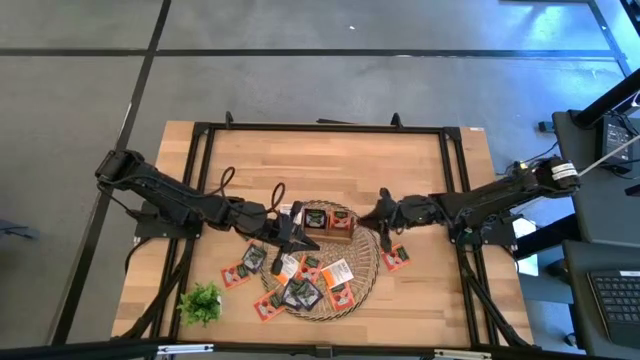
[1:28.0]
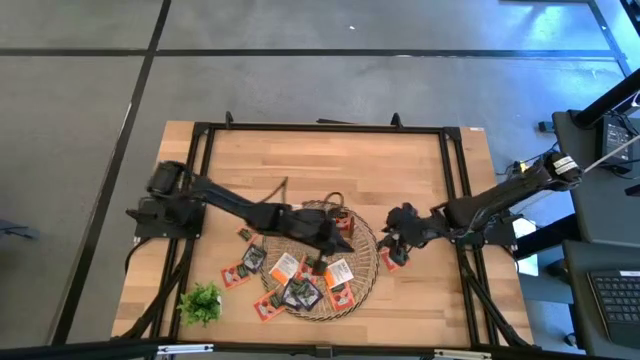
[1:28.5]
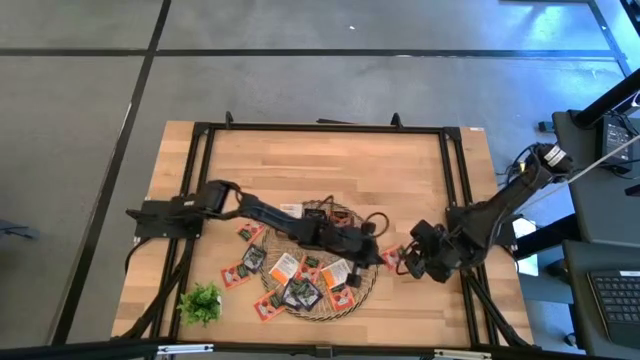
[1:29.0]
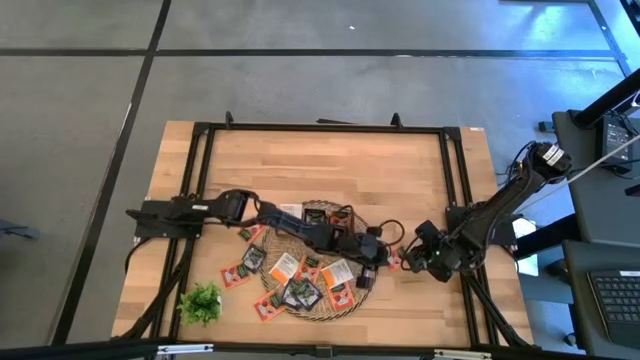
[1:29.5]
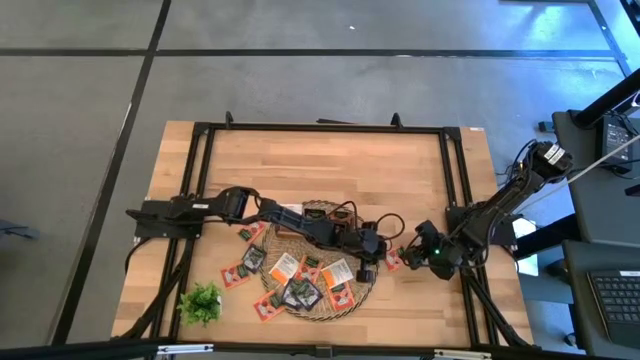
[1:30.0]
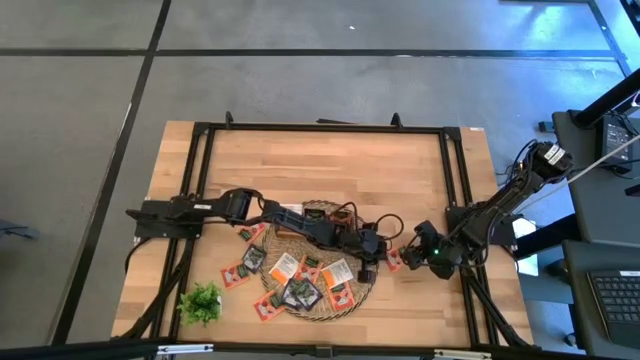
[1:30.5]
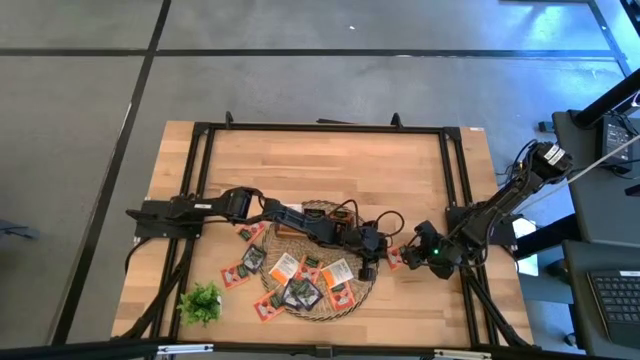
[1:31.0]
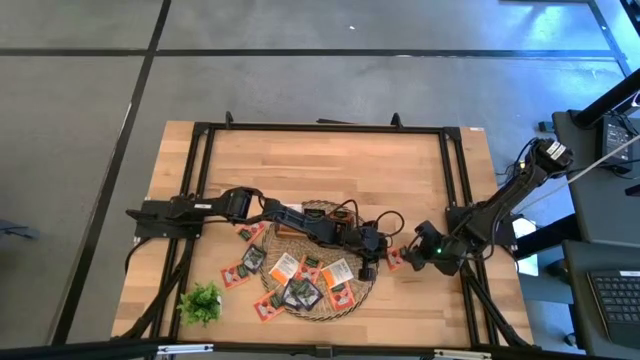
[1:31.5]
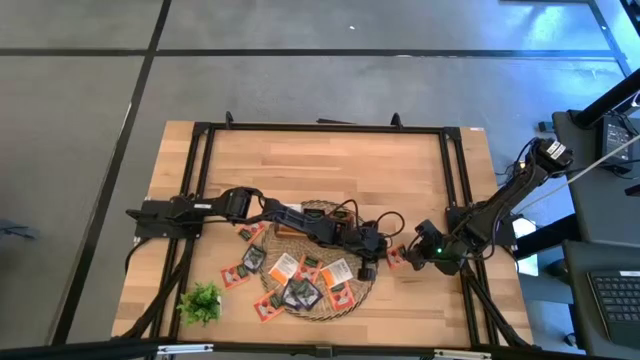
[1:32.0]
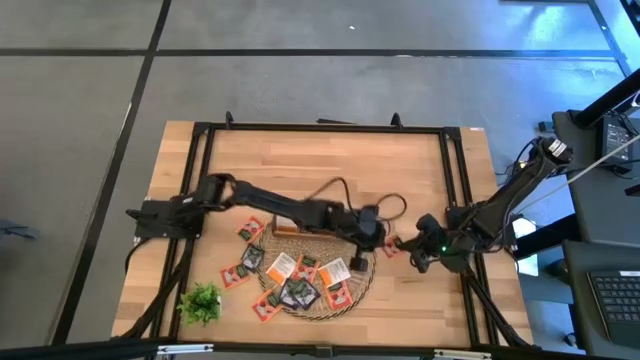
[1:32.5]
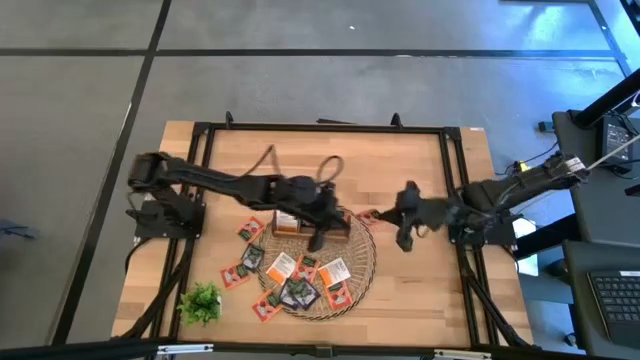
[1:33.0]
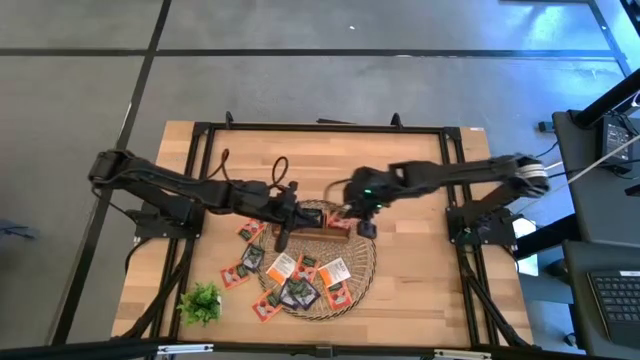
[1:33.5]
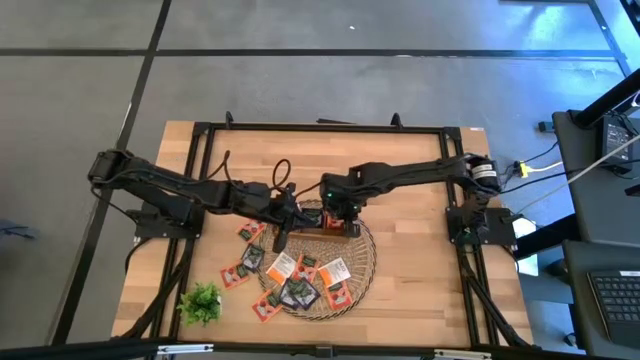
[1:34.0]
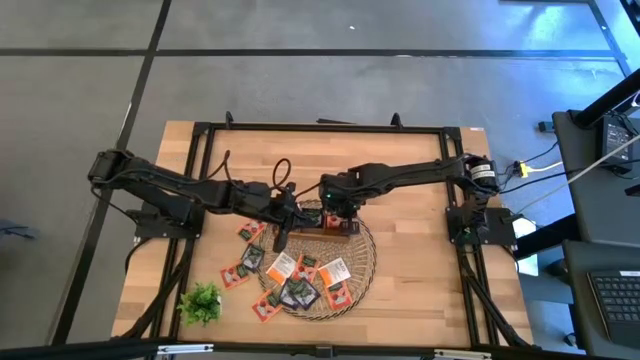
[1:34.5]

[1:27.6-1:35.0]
Task: Pick & Place Tea
Put the orange tea bag into the right slot of the wooden organizer

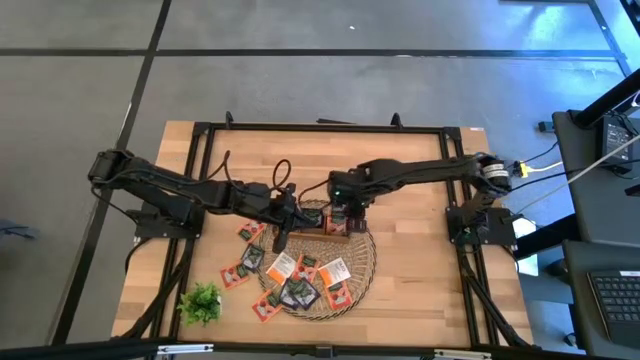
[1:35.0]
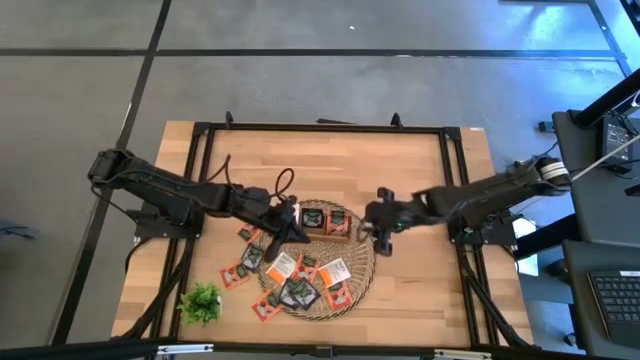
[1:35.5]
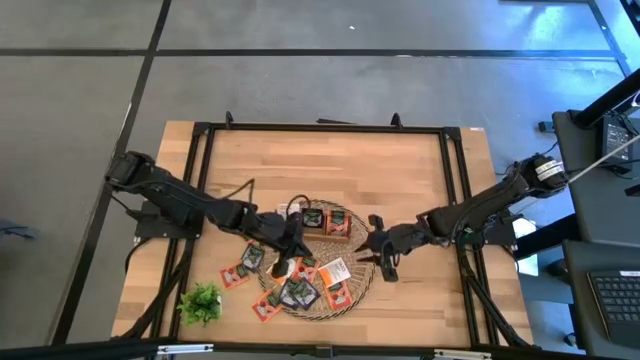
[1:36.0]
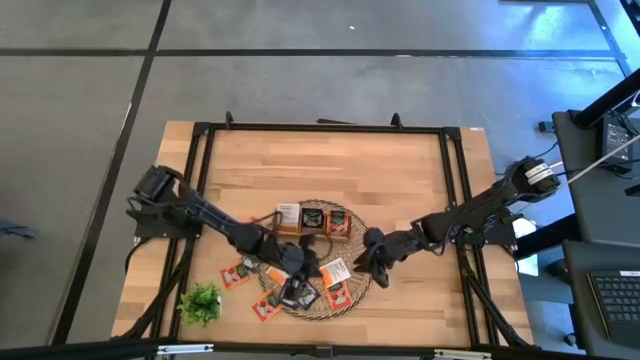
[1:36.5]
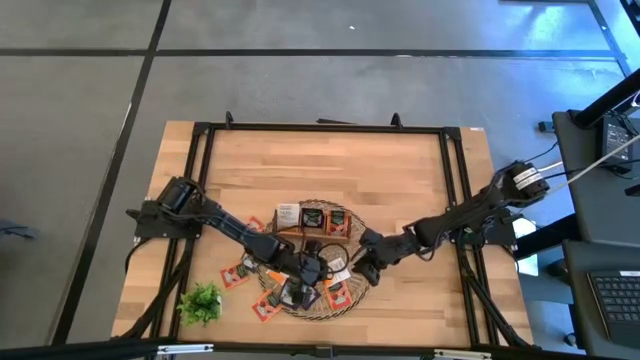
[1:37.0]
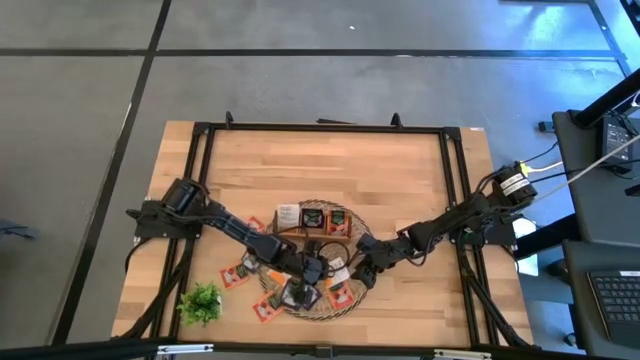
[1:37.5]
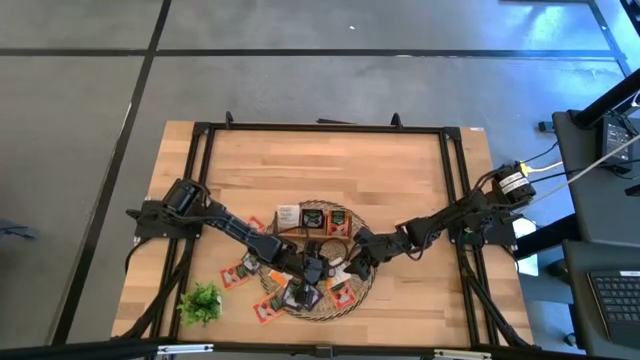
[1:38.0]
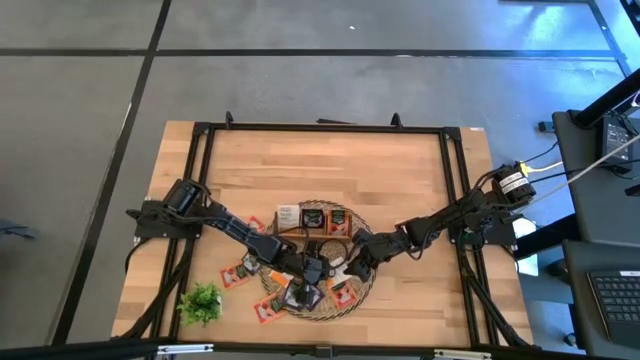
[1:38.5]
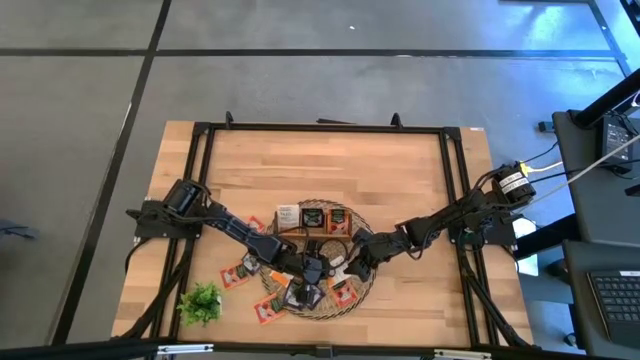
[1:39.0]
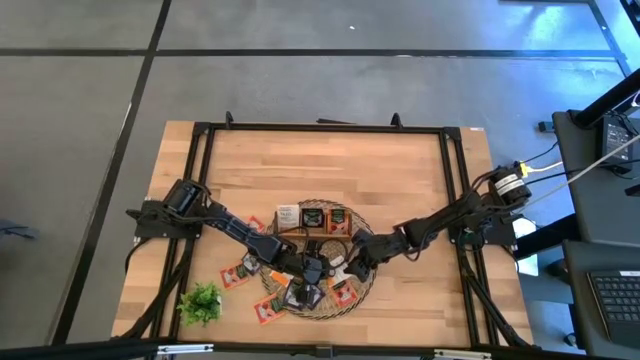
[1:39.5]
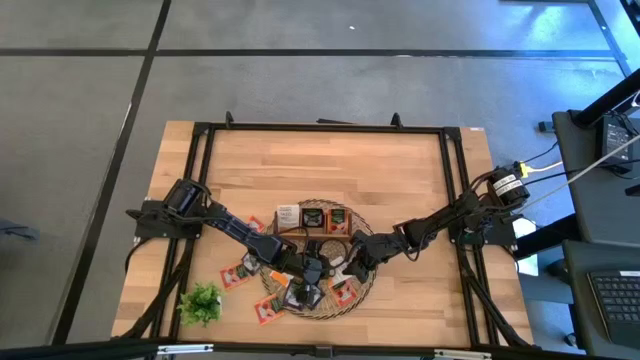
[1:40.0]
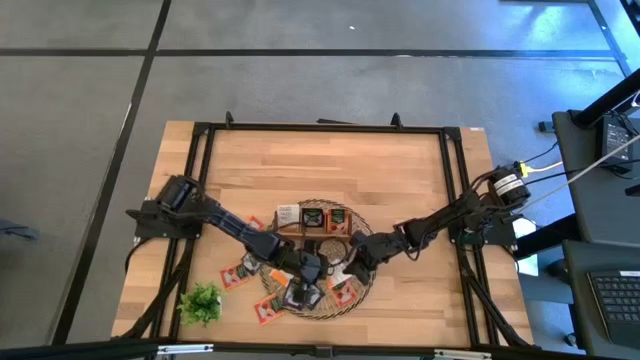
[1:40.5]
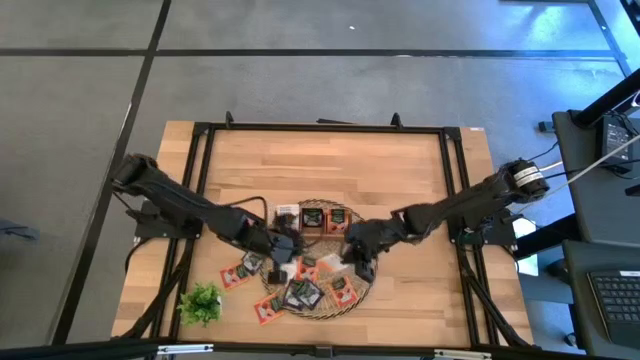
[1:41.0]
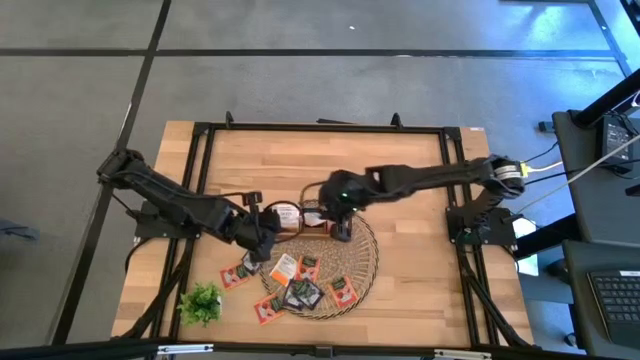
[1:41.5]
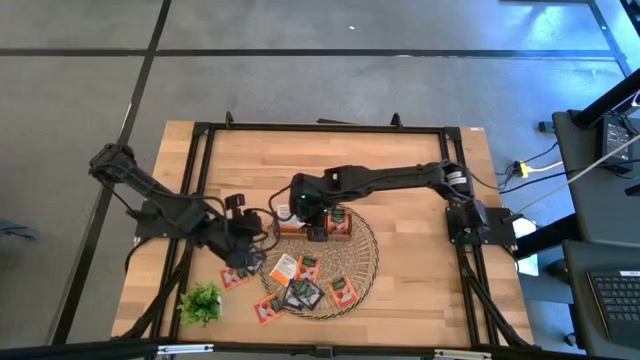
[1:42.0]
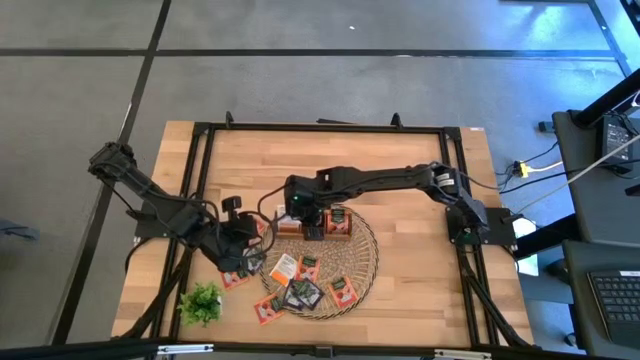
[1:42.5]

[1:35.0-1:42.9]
Put the right white tea bag into the left slot of the wooden organizer
